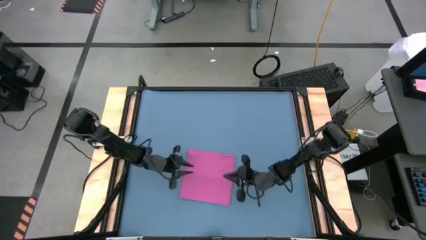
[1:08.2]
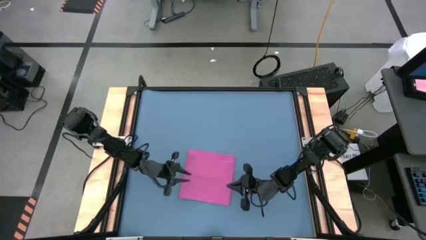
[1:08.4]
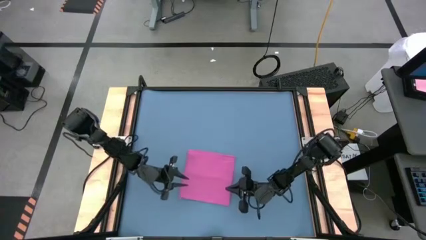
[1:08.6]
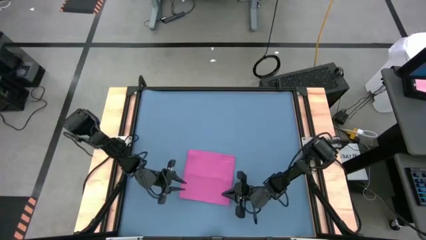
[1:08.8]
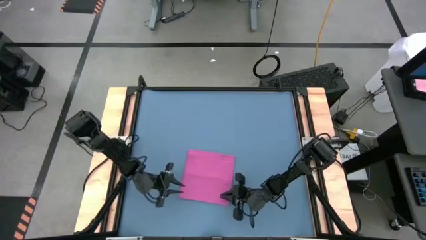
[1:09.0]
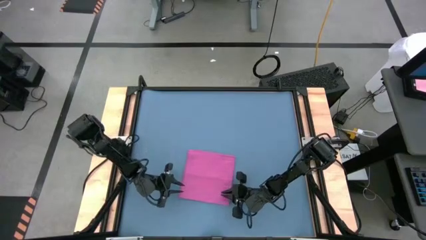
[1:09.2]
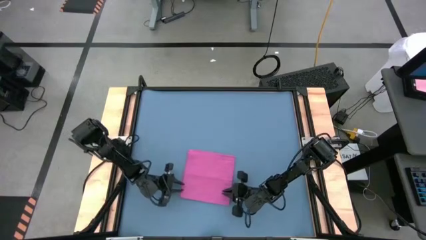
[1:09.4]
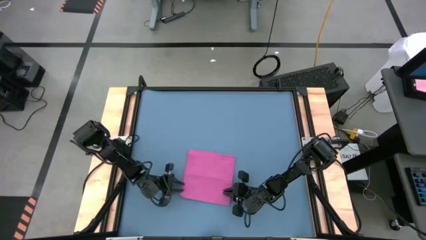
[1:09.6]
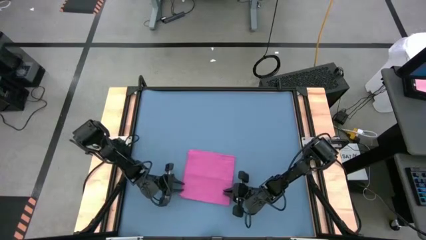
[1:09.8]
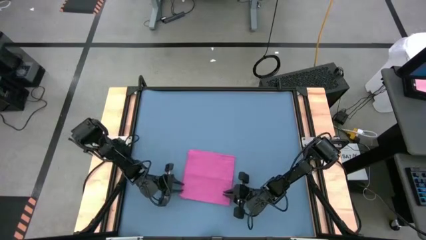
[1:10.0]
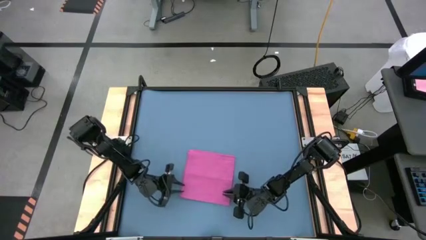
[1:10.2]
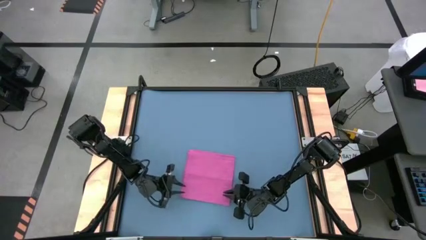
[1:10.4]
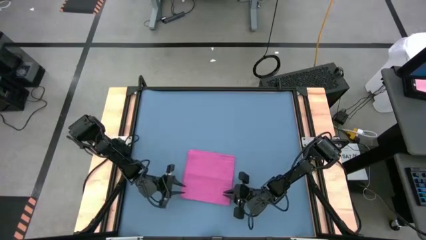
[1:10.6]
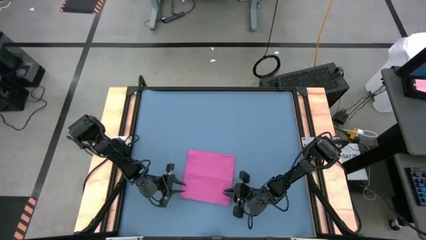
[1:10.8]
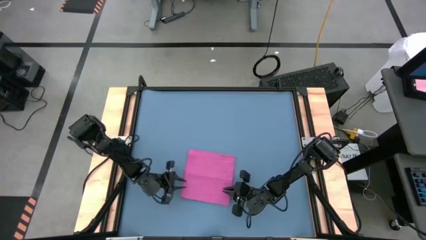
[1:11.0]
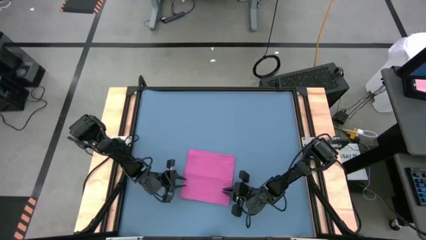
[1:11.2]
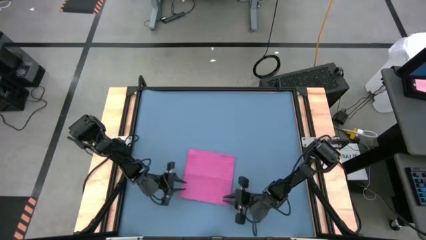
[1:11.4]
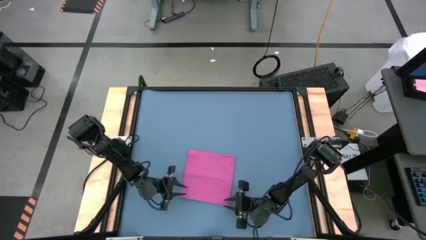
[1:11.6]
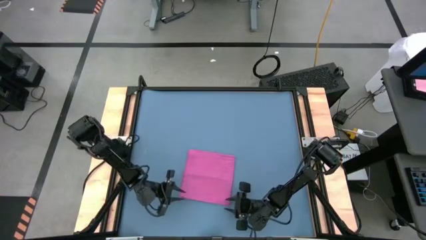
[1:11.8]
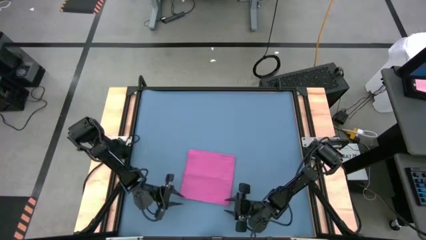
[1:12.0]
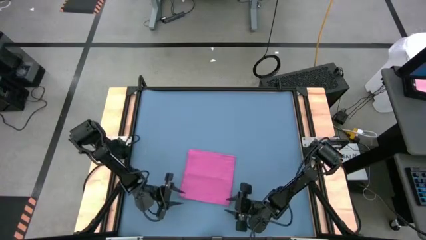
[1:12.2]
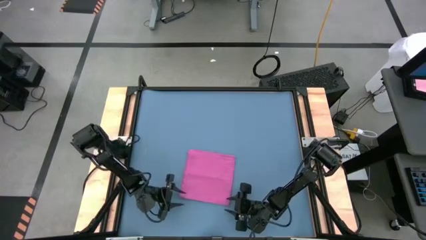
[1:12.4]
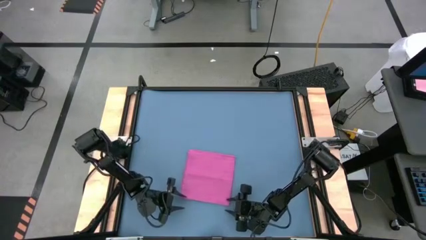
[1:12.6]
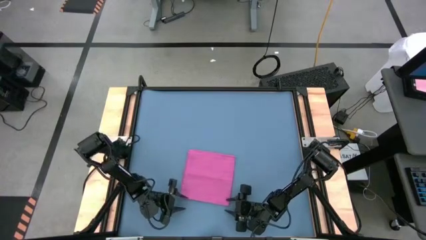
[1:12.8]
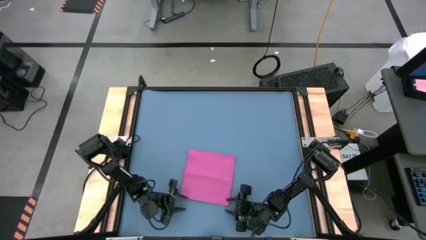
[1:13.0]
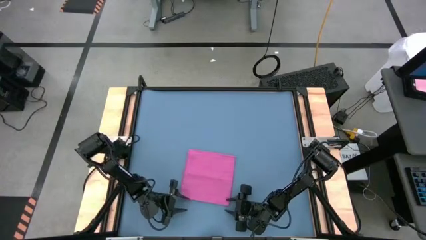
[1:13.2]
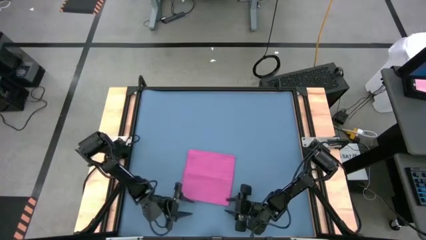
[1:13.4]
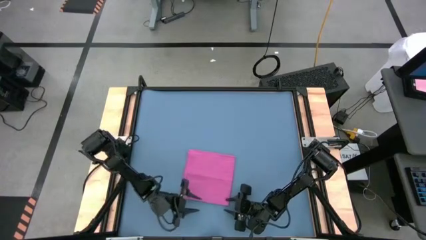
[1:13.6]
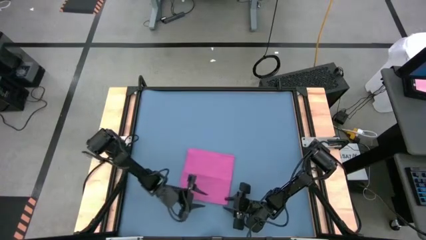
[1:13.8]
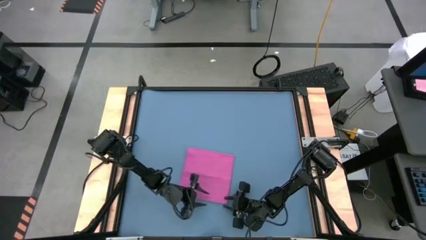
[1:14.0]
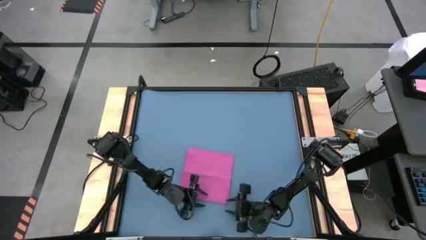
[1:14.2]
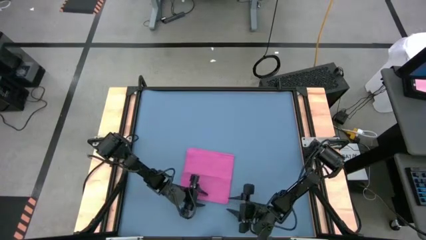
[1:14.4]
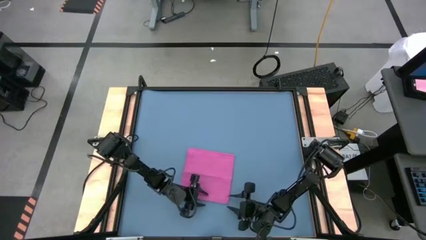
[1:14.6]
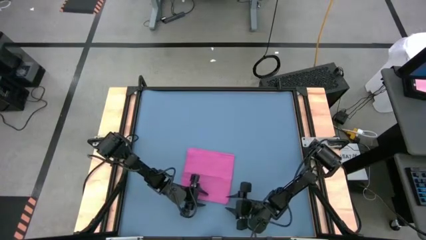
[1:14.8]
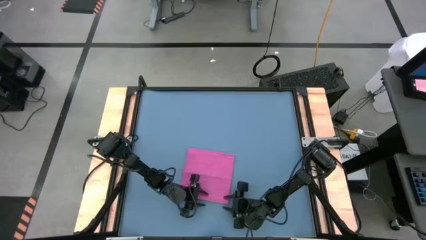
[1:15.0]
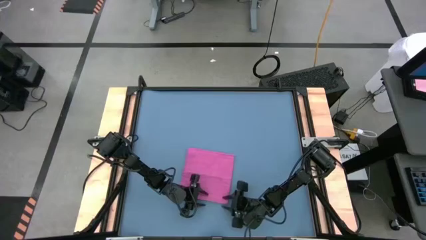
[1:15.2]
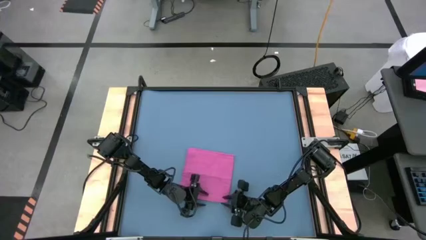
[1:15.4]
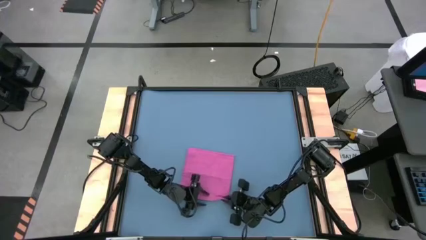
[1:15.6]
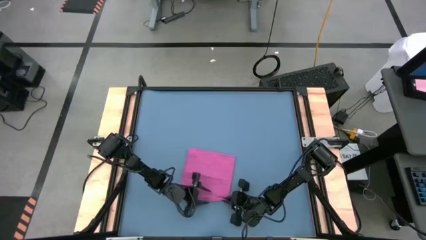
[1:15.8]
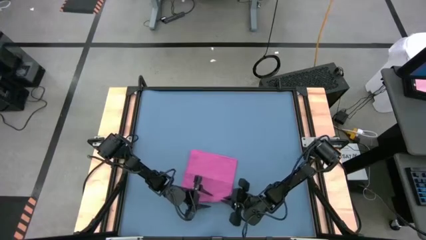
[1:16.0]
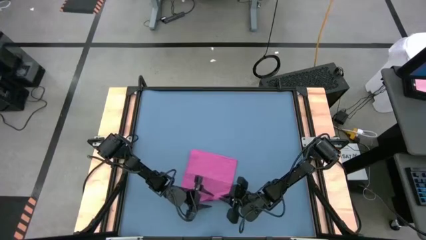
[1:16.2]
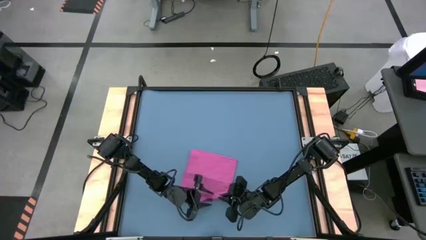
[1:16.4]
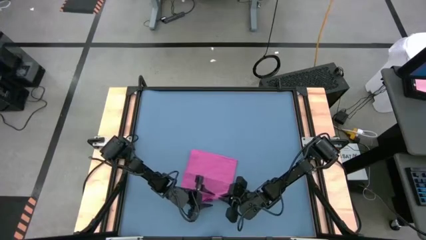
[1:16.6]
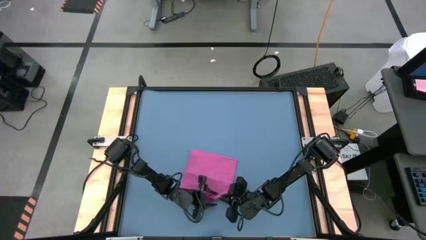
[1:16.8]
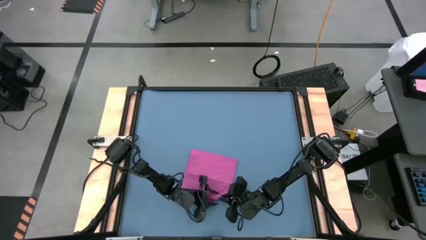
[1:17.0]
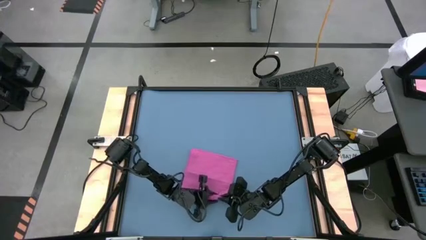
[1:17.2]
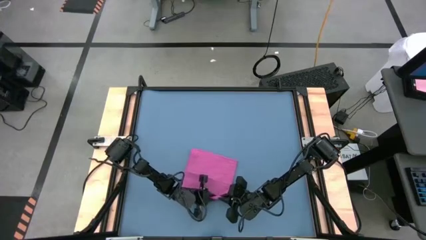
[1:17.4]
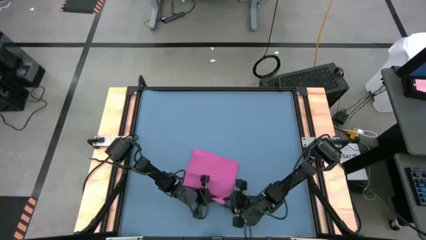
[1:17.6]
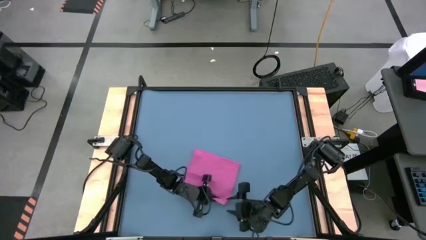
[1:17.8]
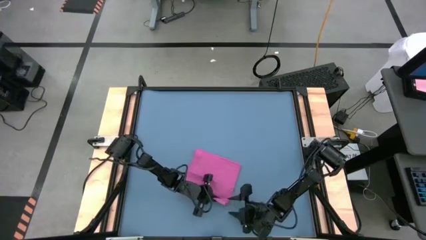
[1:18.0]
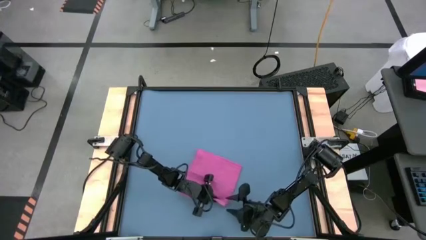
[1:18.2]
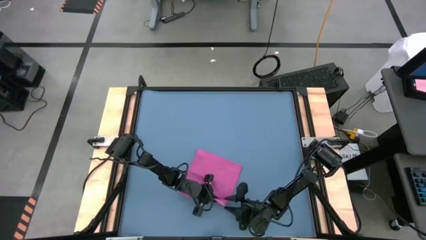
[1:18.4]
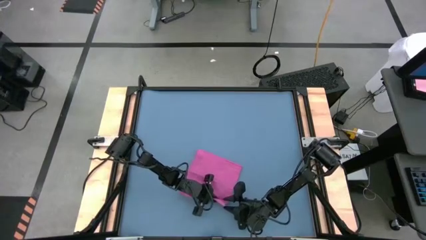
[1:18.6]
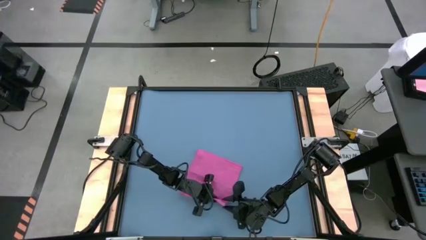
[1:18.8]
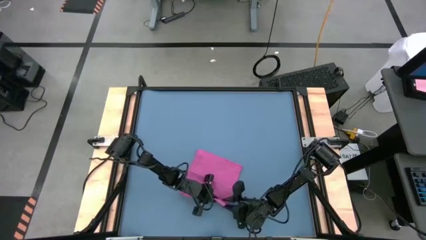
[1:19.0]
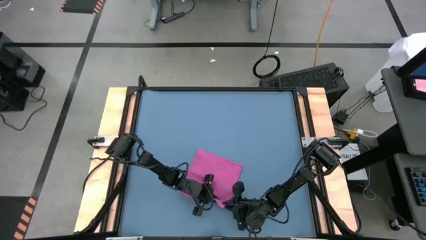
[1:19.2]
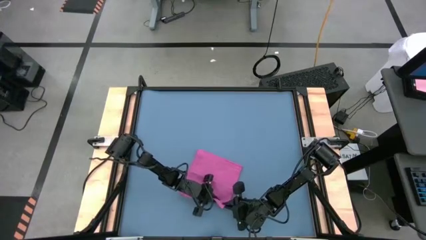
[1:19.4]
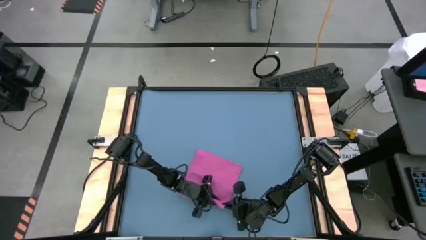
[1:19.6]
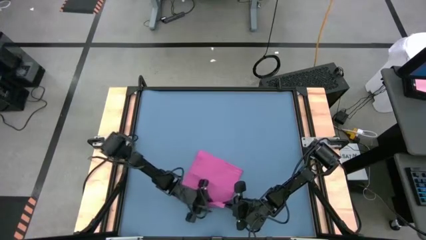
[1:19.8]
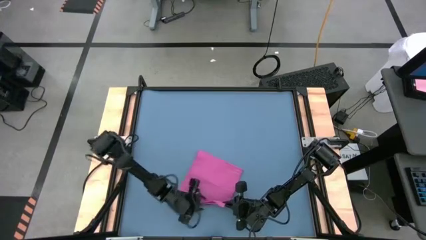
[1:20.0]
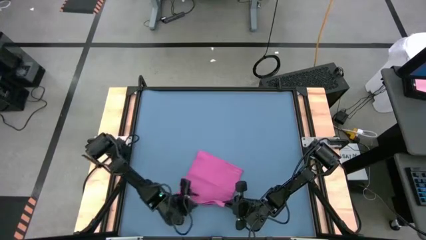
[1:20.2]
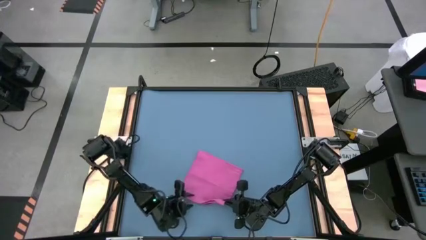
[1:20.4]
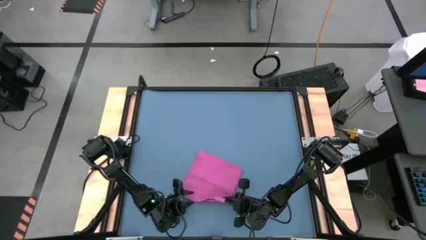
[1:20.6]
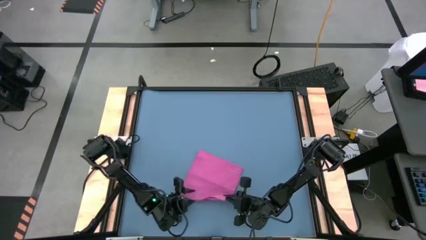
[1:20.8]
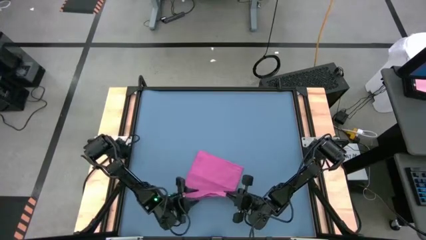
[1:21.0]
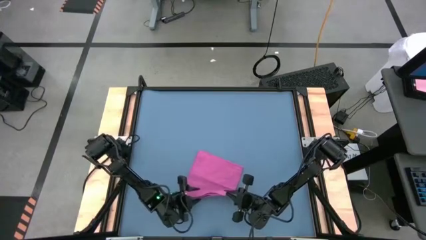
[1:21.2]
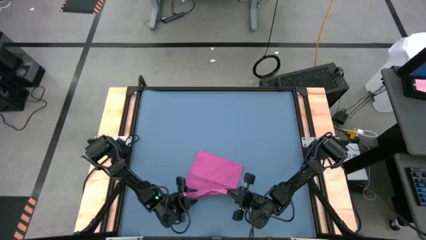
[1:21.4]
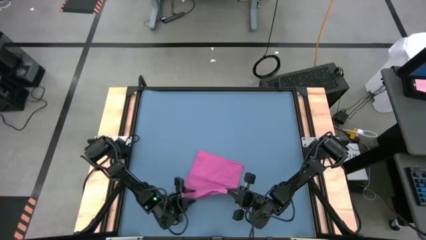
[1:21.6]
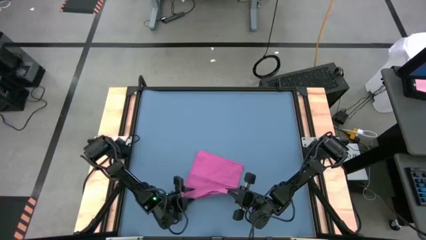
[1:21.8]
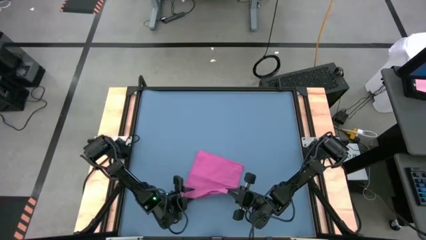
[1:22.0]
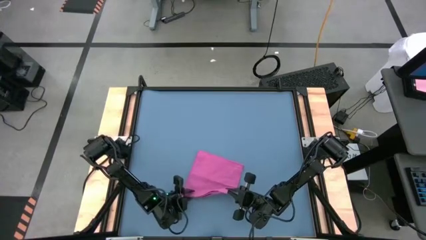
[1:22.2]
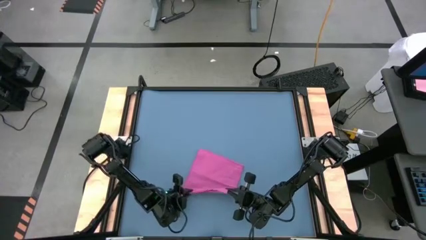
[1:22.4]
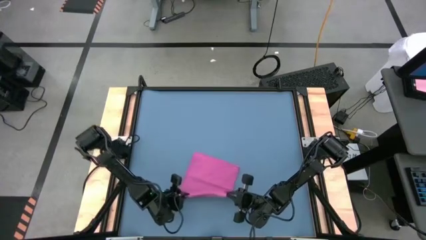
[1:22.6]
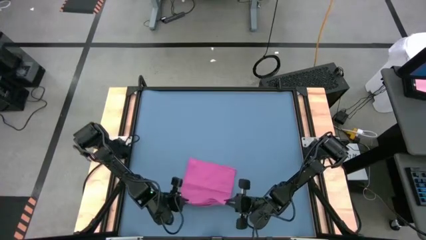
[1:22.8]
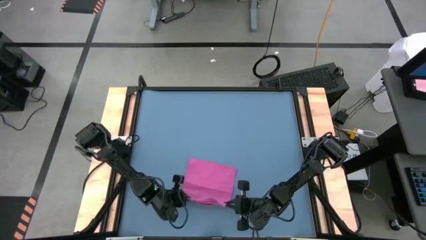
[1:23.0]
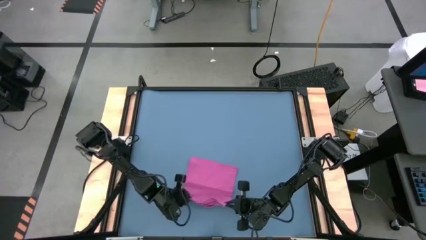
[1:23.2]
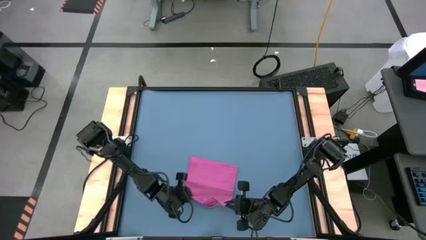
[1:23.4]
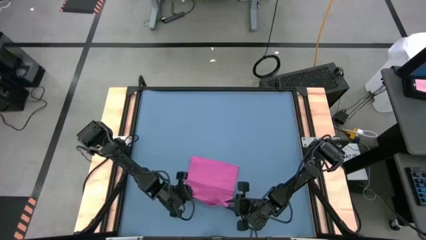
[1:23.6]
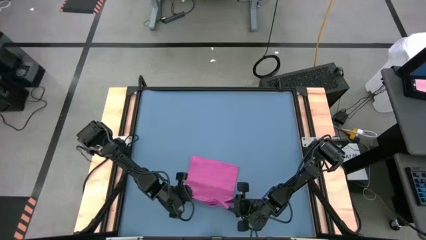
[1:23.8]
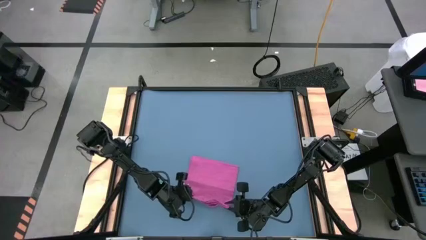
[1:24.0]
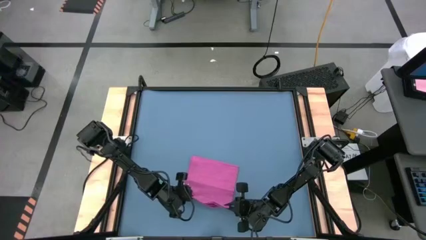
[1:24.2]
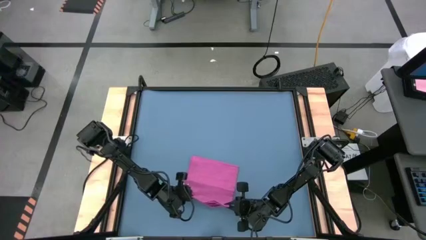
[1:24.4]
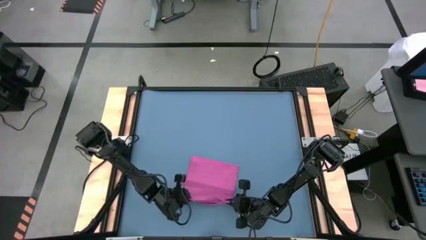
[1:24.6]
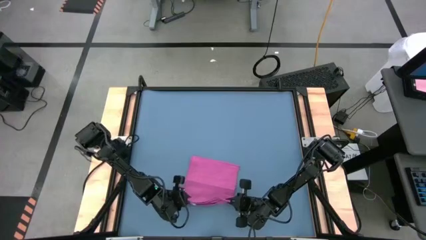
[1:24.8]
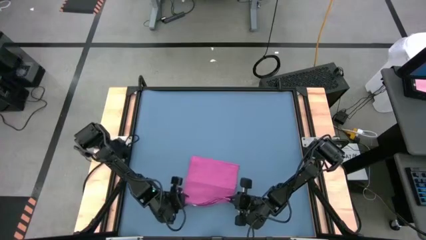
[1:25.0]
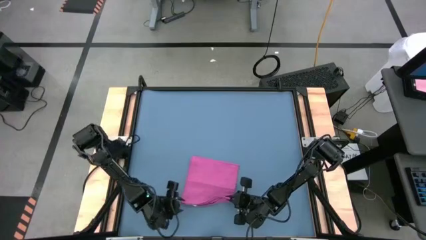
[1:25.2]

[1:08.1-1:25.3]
Task: Roll towel
Roll the light red towel
